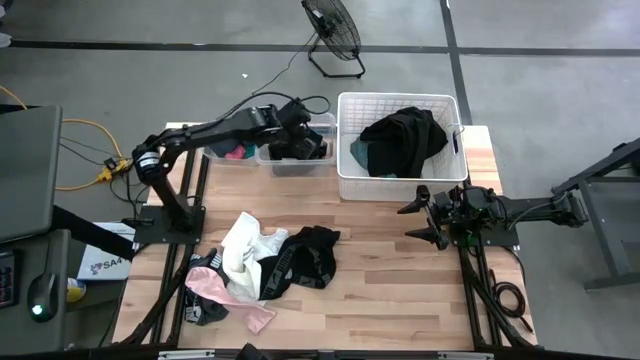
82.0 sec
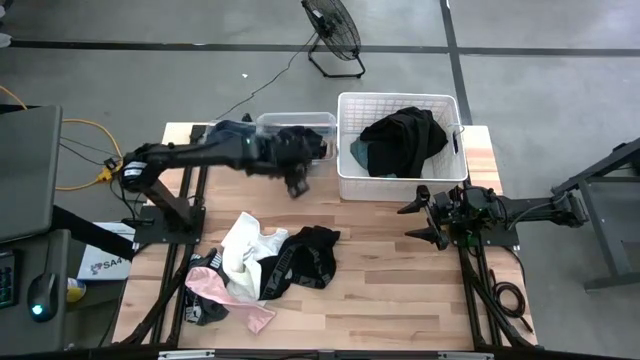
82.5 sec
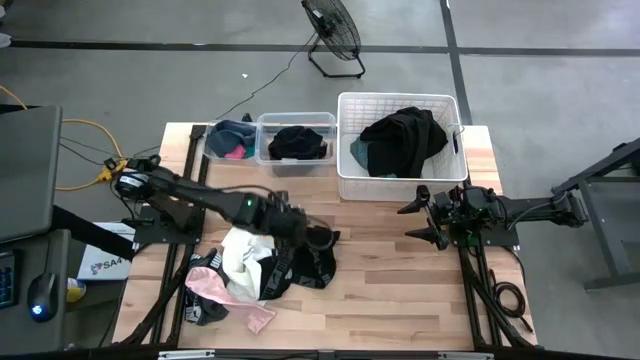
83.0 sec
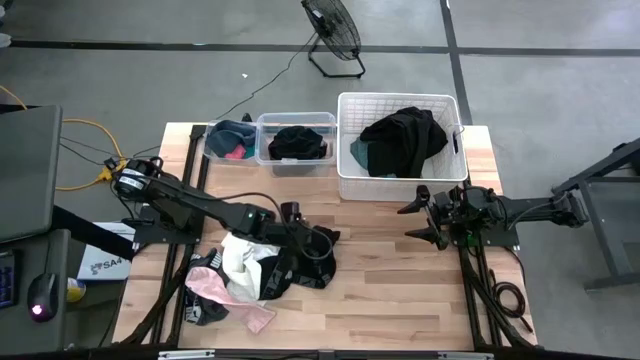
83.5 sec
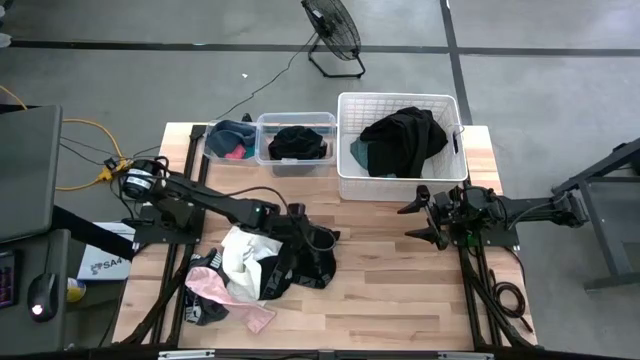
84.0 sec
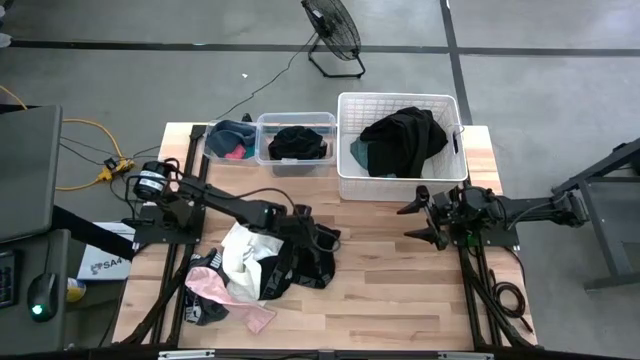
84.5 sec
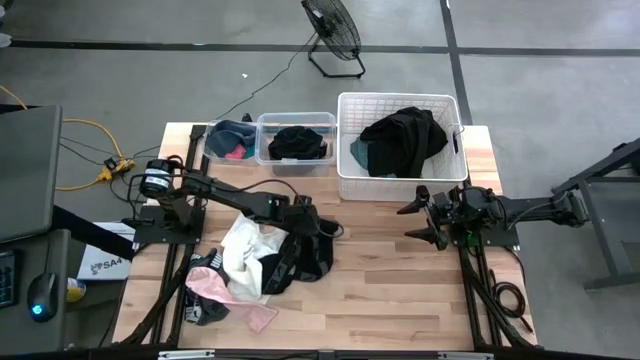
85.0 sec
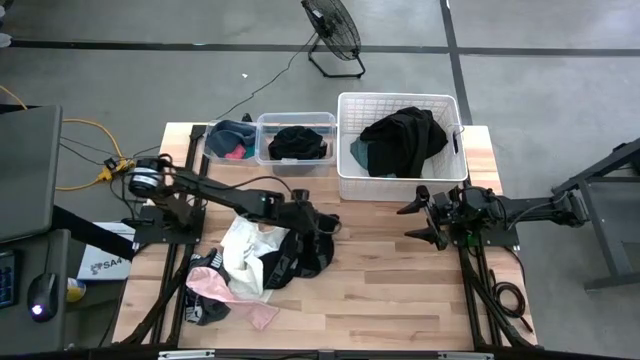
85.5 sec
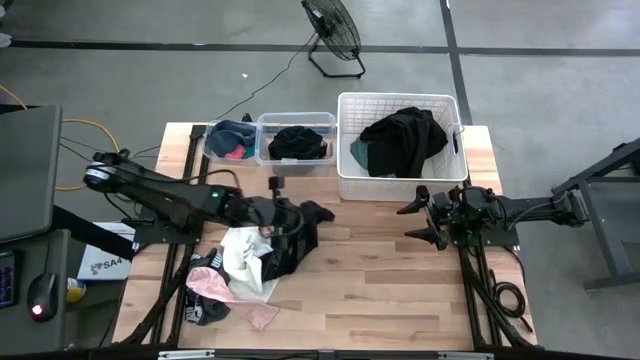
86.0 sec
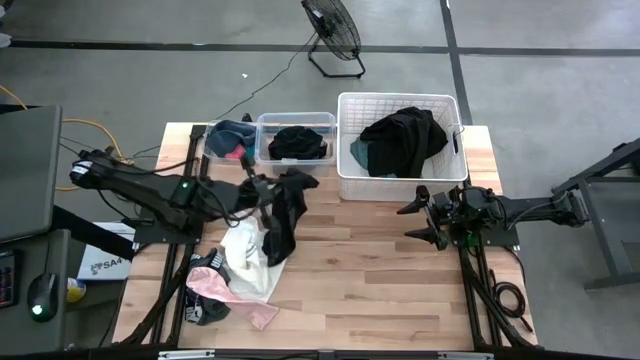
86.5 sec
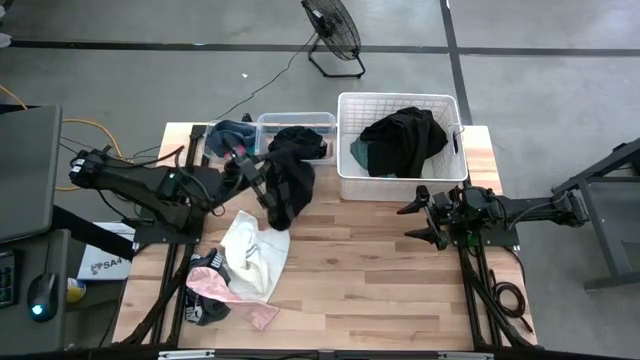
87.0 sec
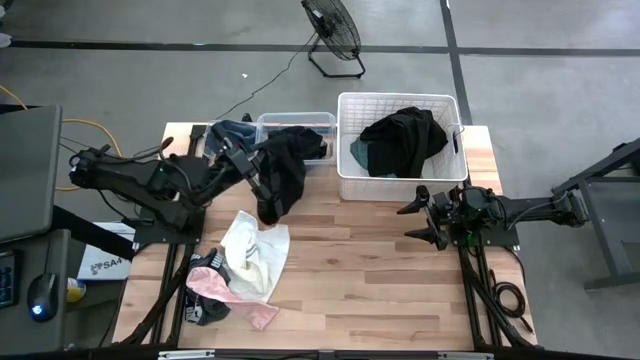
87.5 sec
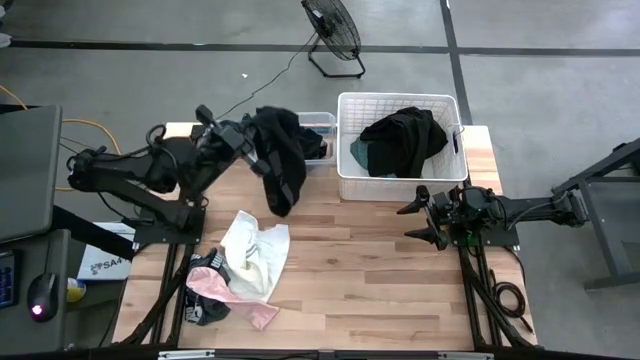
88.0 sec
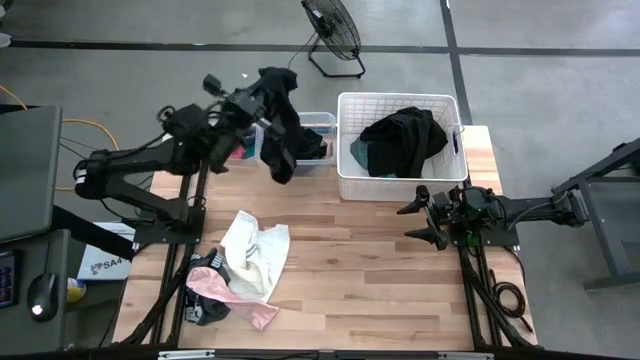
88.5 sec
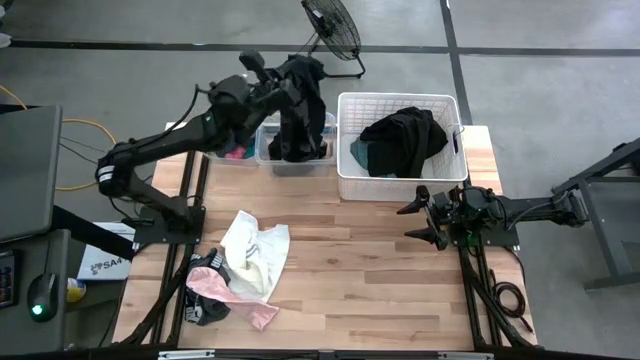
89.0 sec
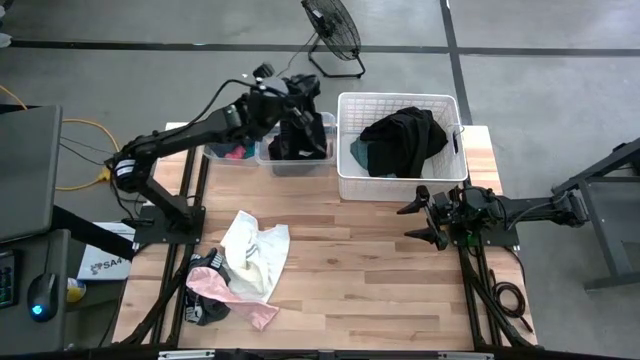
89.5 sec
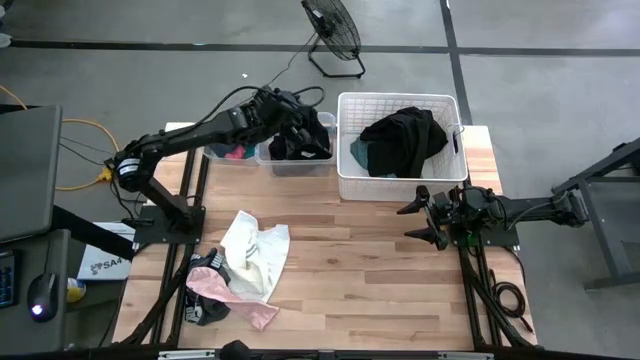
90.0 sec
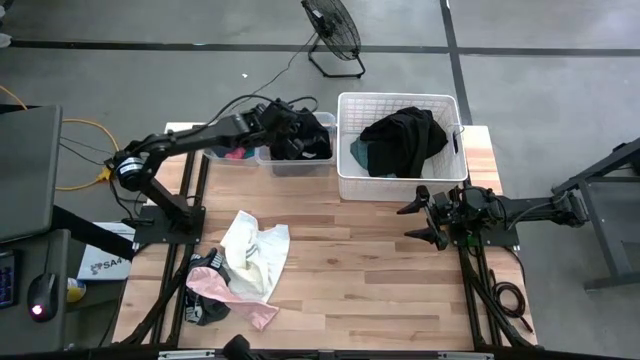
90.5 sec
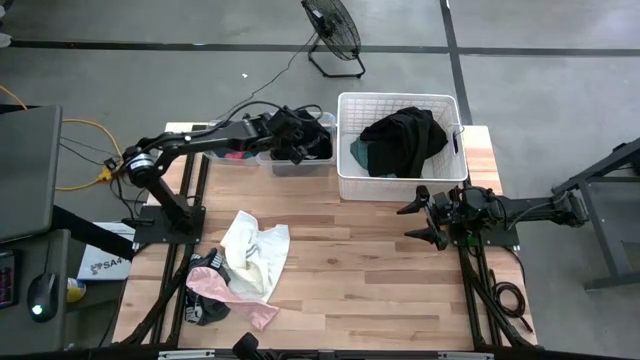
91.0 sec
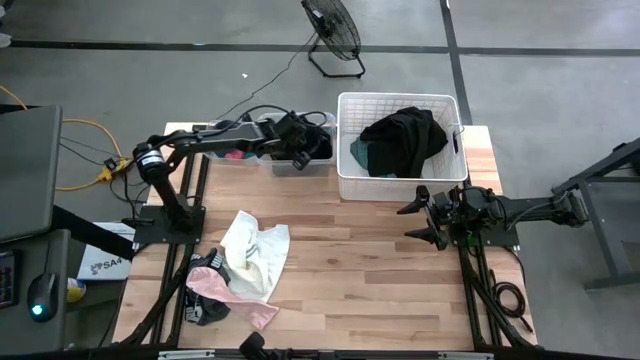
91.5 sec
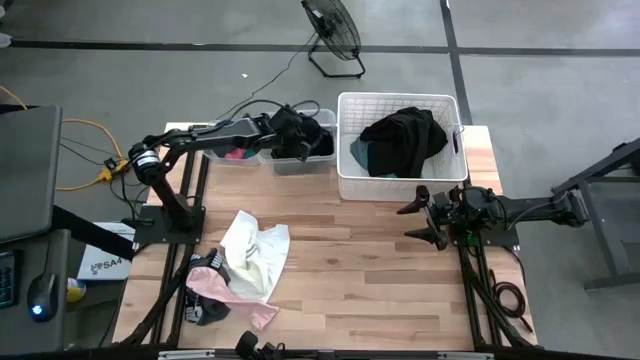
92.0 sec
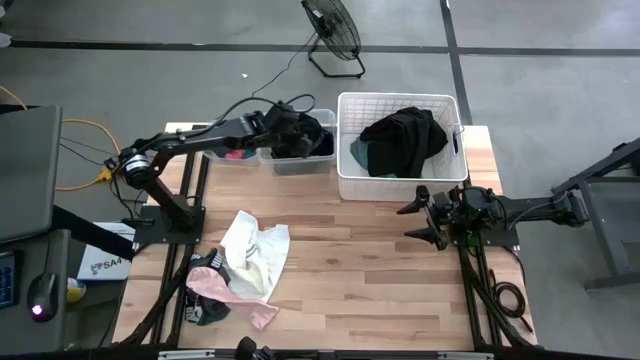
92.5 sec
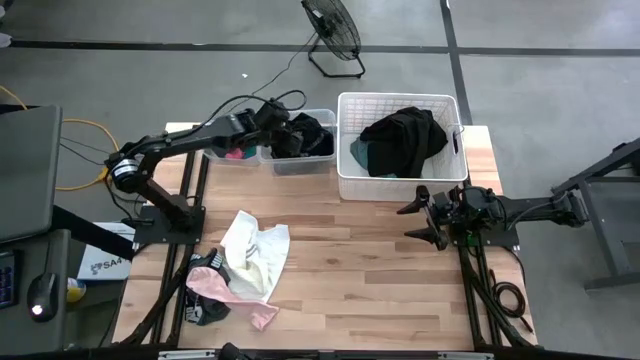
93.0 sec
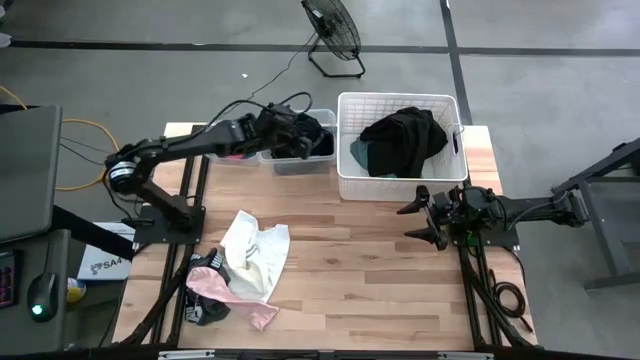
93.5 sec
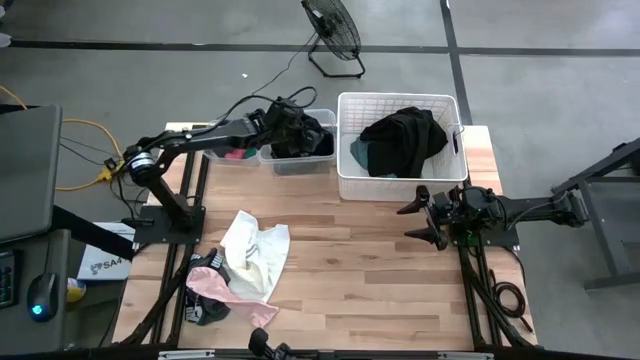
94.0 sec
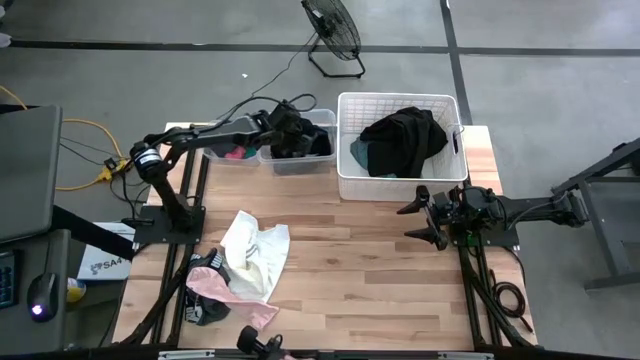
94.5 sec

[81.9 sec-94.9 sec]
Task: Pick & Place Cloths
Put the black boxer into the right transparent bin

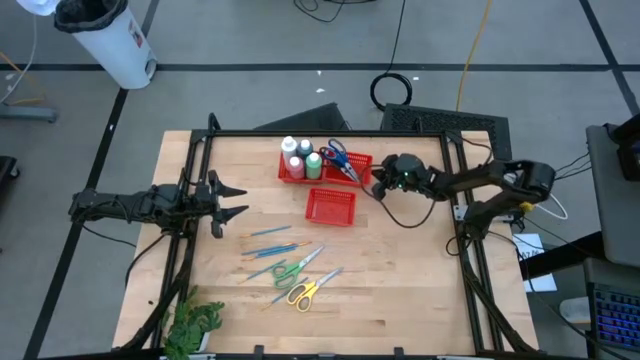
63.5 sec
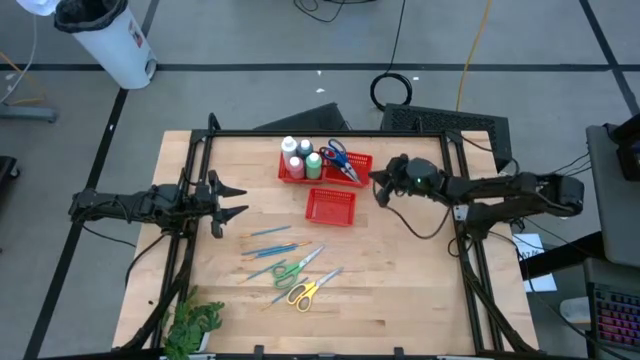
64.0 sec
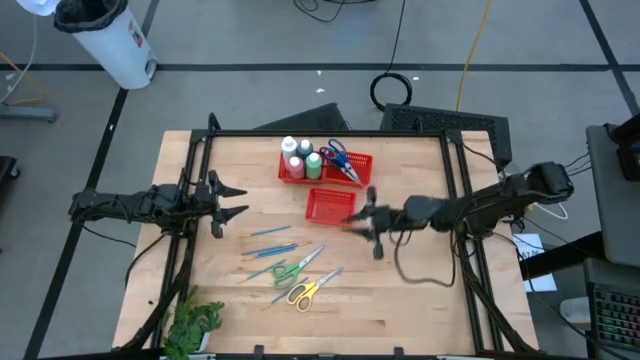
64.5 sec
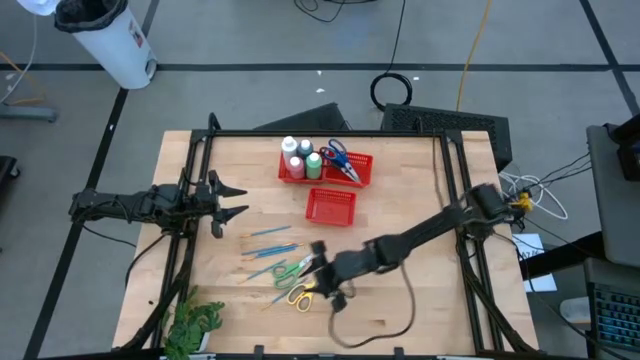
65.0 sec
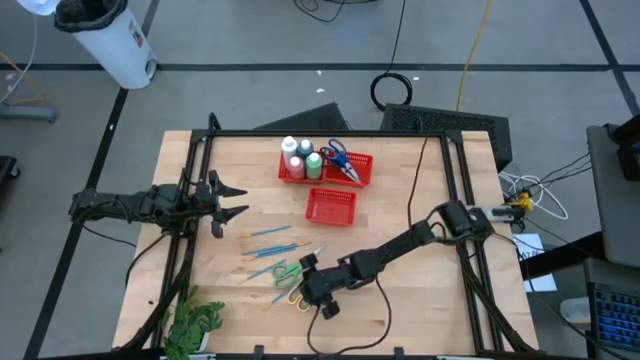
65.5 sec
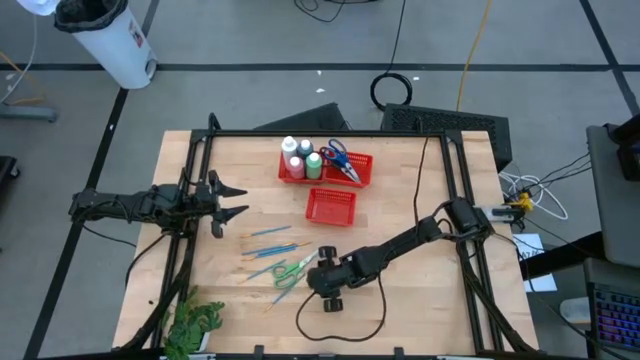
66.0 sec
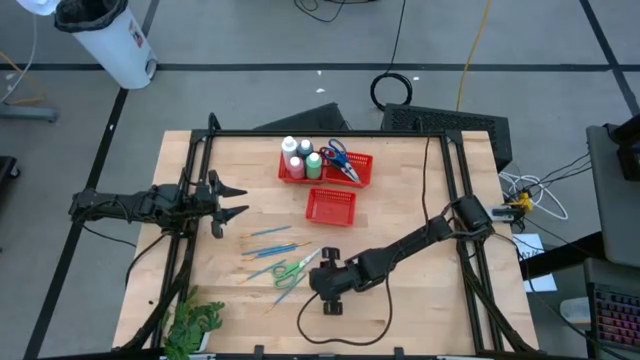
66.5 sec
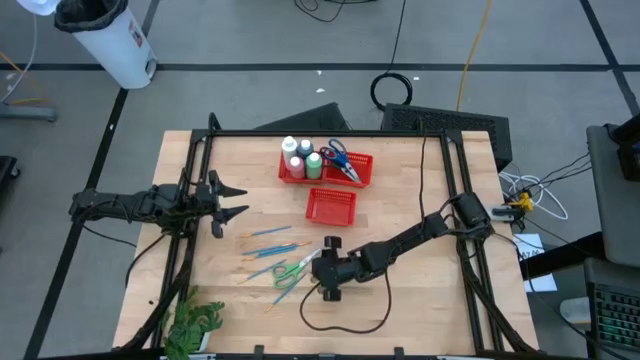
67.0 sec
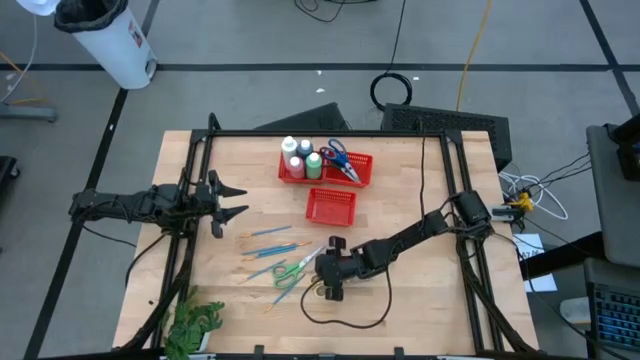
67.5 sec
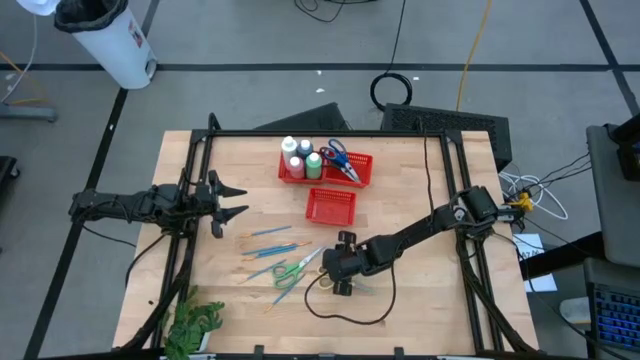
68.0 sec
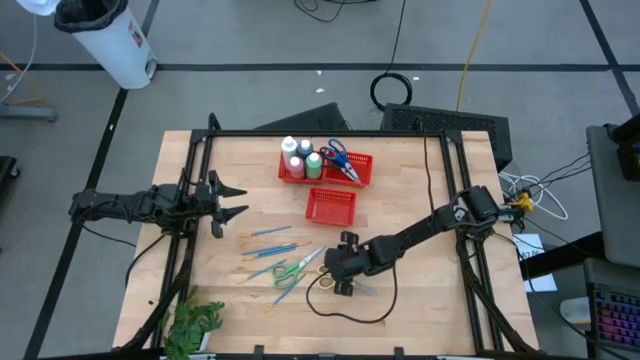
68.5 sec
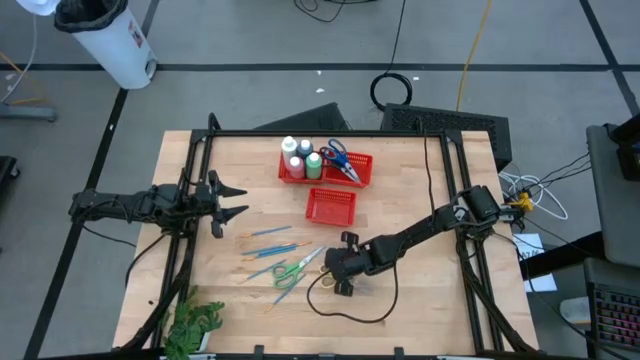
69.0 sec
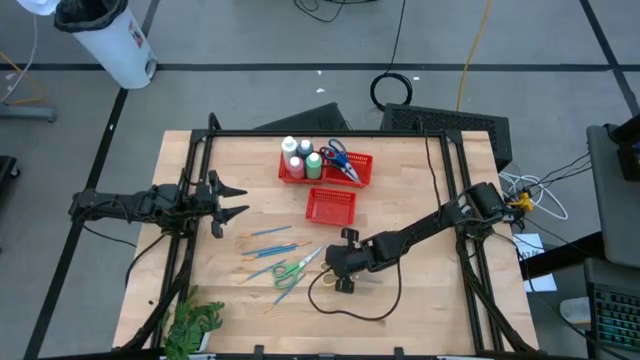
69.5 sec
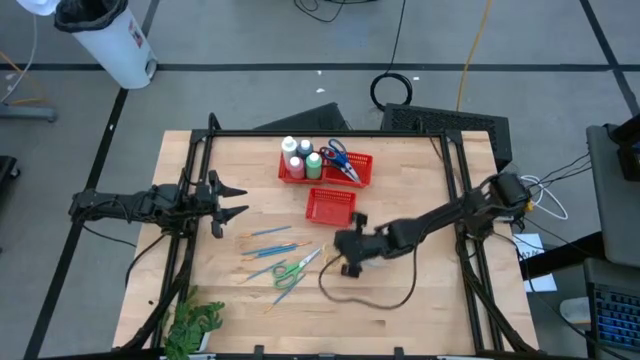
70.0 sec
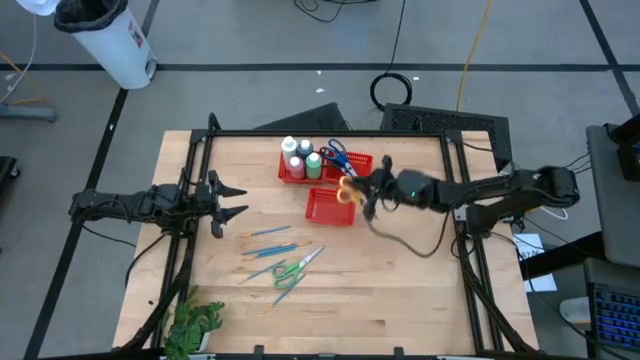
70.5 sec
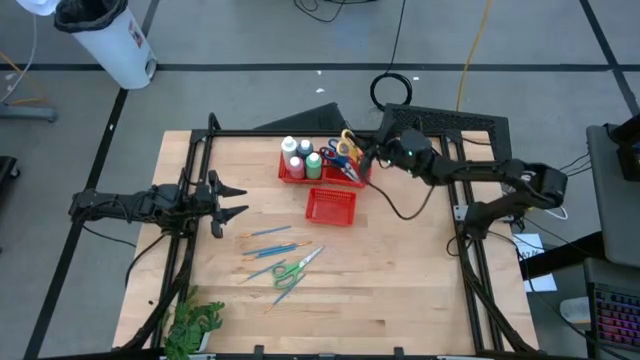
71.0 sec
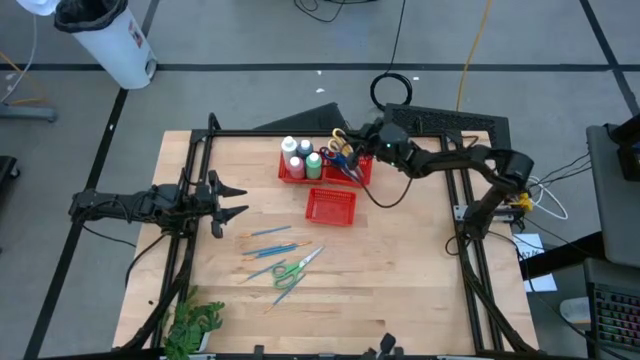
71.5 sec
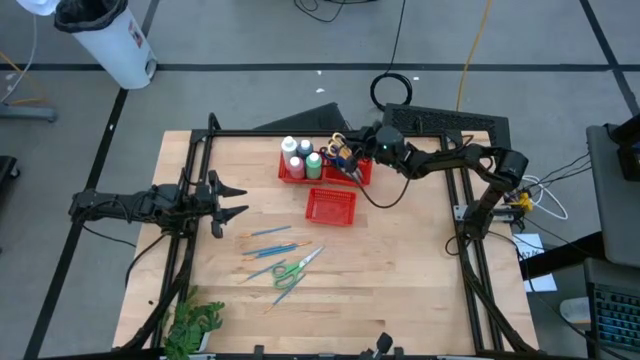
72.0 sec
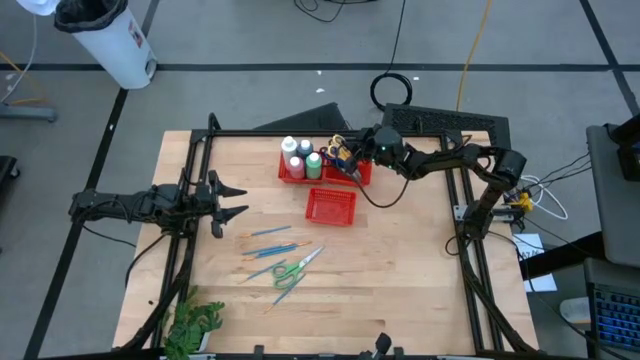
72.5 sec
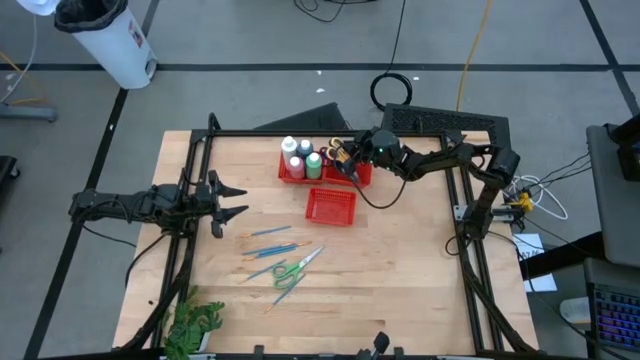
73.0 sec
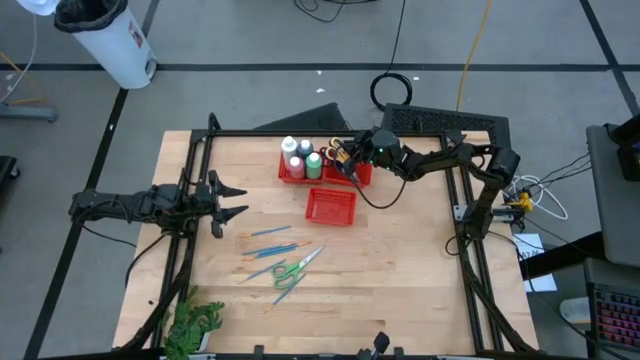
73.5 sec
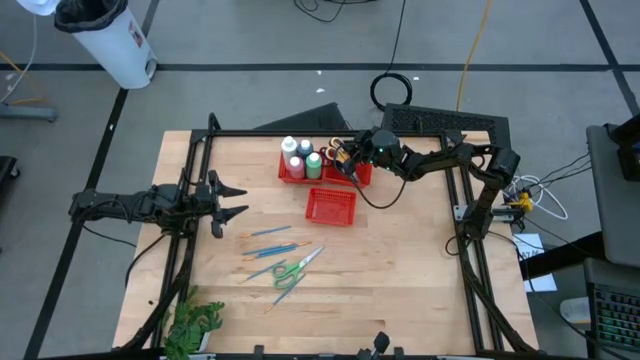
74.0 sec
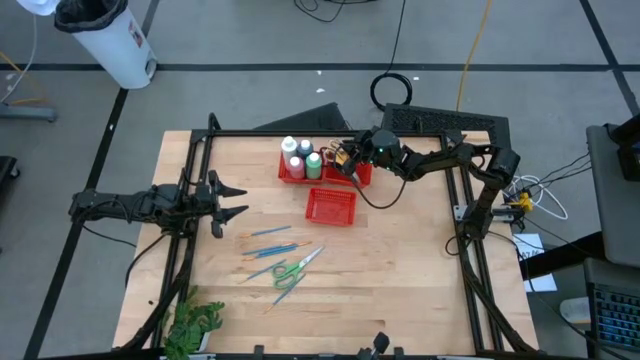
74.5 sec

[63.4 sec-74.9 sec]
Task: Pick & Place Paint Supplies
Put the yellow scissors into the top right red bin
